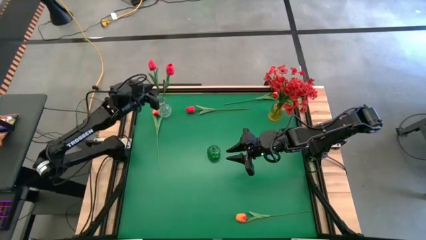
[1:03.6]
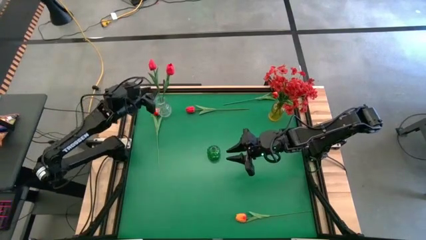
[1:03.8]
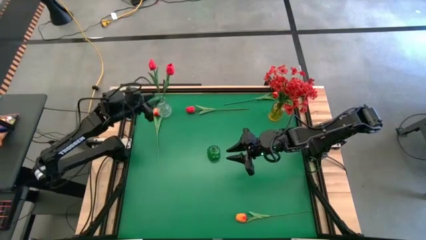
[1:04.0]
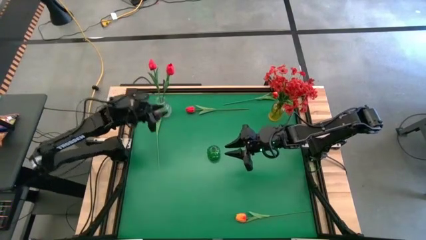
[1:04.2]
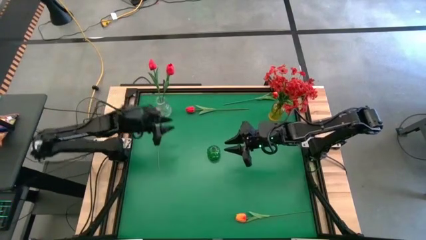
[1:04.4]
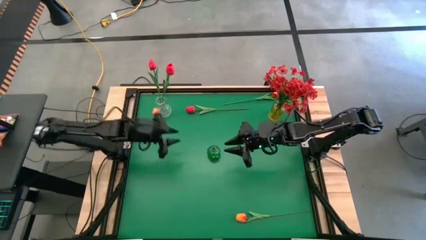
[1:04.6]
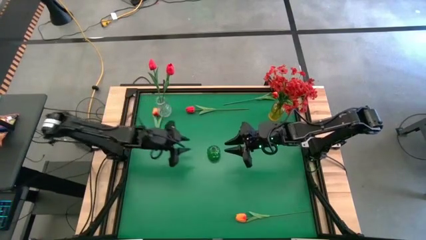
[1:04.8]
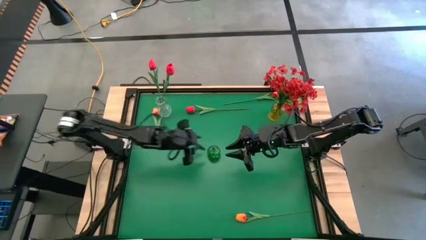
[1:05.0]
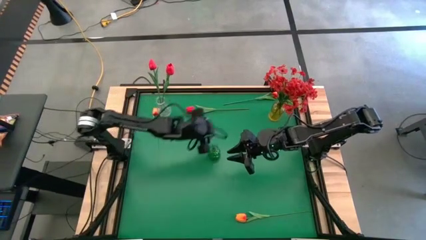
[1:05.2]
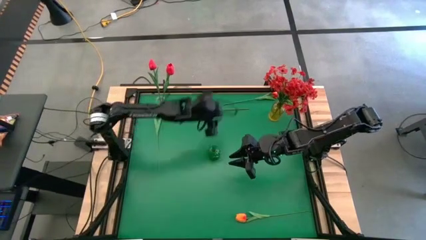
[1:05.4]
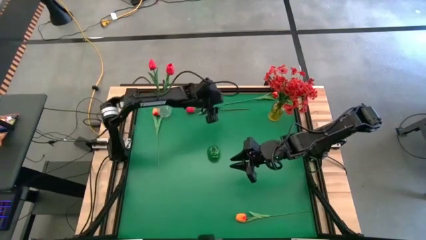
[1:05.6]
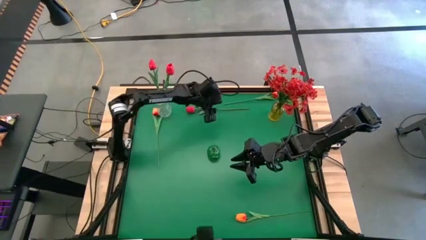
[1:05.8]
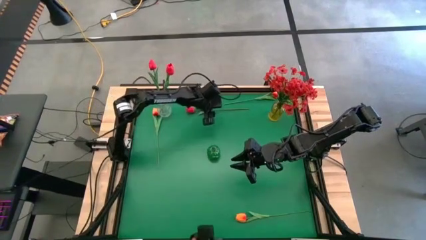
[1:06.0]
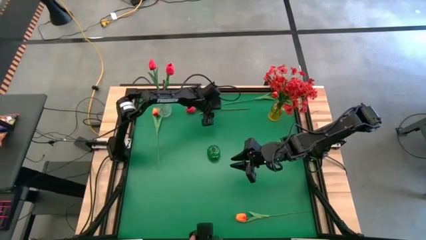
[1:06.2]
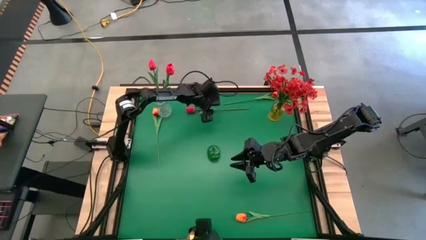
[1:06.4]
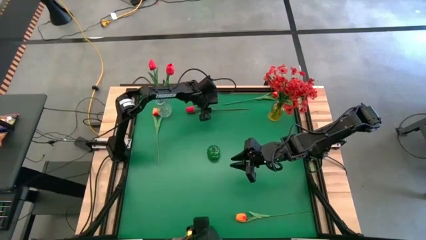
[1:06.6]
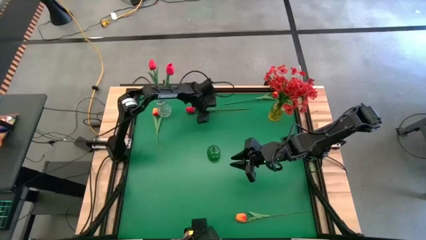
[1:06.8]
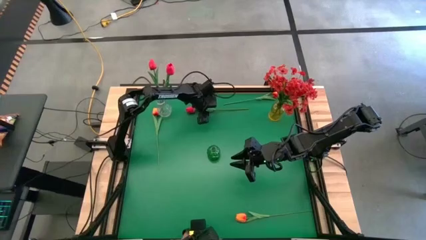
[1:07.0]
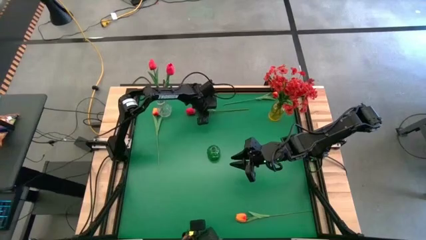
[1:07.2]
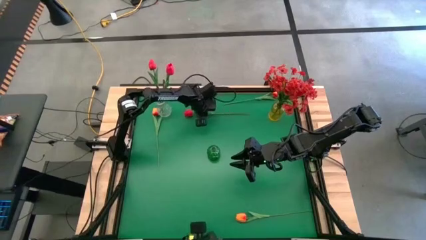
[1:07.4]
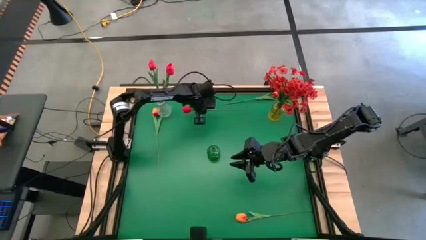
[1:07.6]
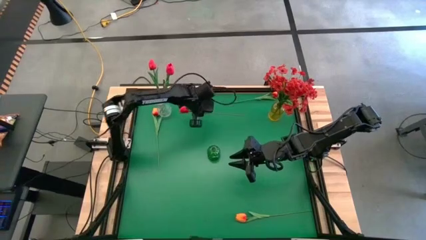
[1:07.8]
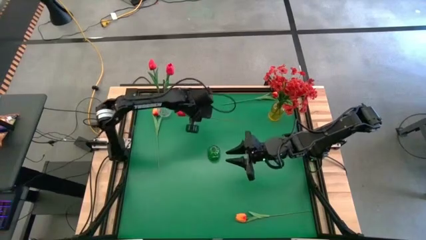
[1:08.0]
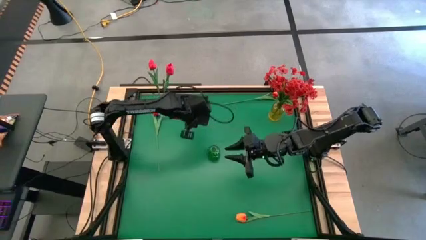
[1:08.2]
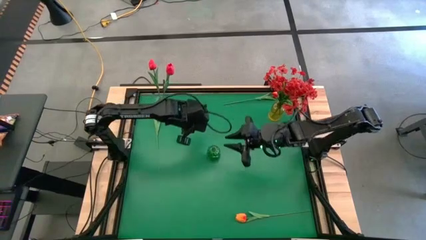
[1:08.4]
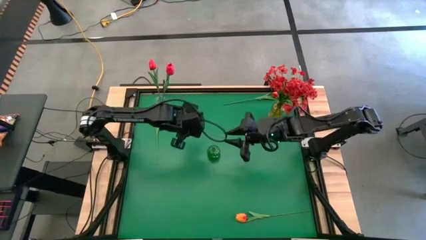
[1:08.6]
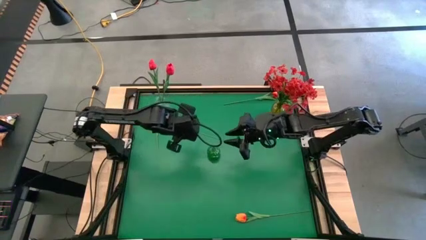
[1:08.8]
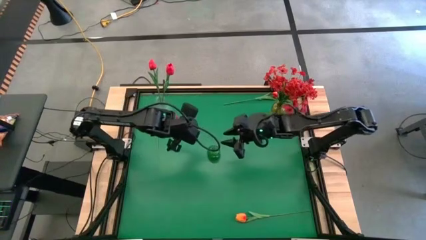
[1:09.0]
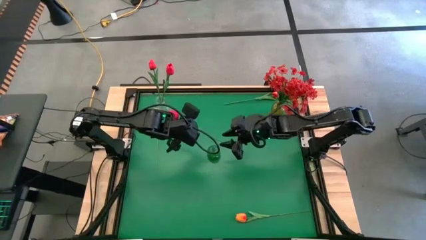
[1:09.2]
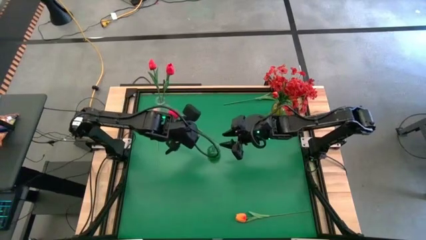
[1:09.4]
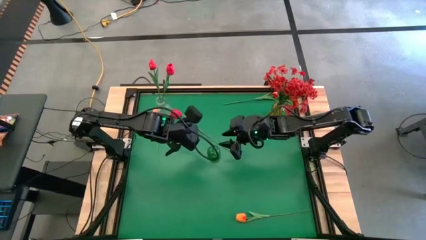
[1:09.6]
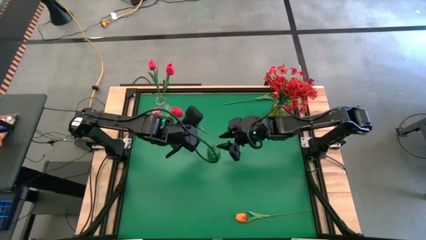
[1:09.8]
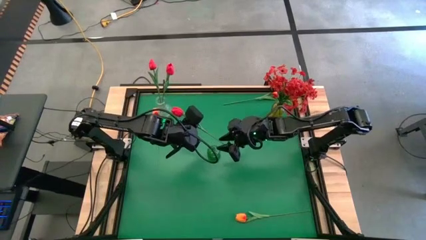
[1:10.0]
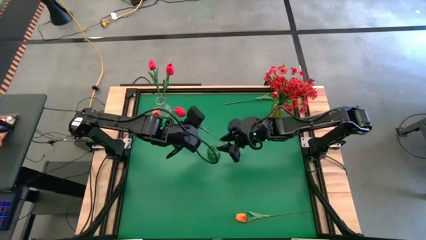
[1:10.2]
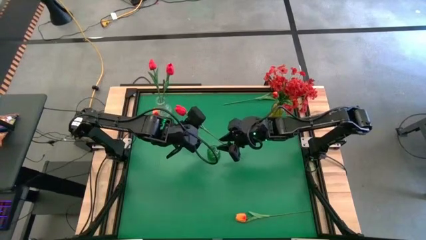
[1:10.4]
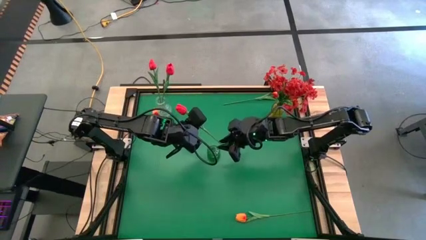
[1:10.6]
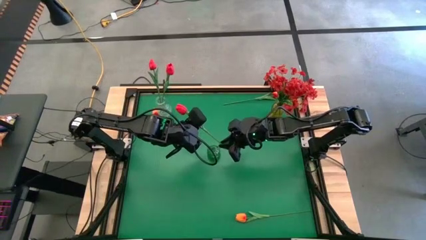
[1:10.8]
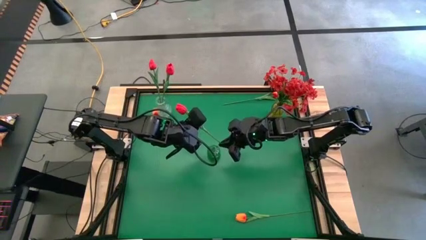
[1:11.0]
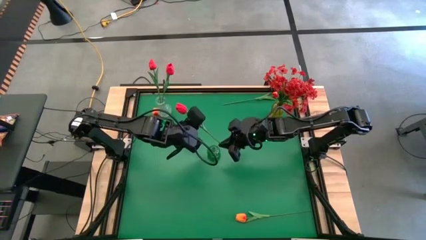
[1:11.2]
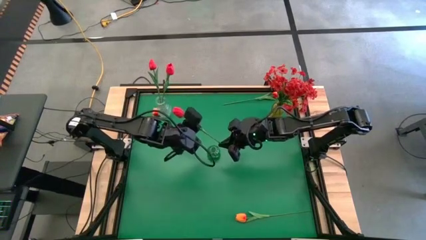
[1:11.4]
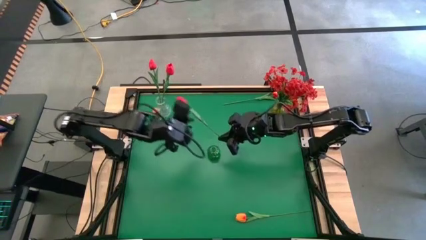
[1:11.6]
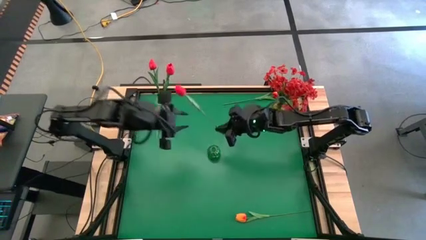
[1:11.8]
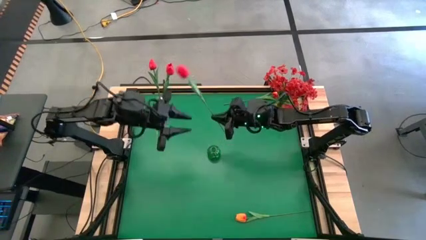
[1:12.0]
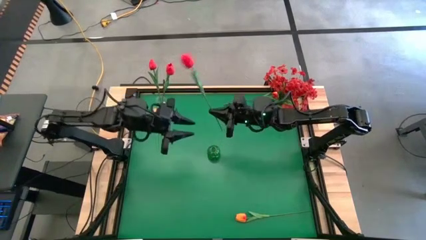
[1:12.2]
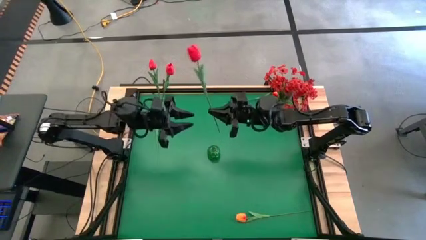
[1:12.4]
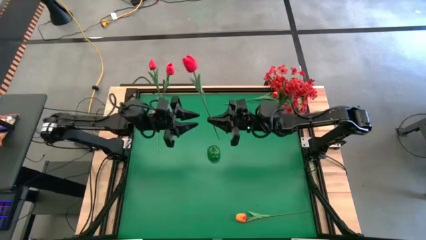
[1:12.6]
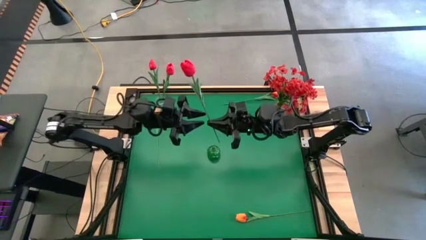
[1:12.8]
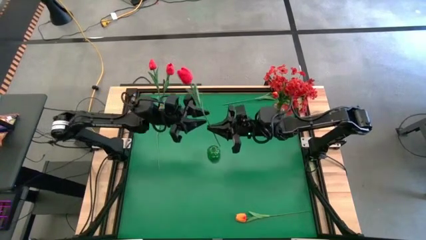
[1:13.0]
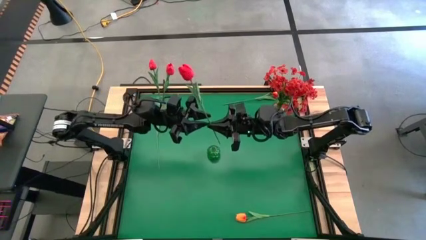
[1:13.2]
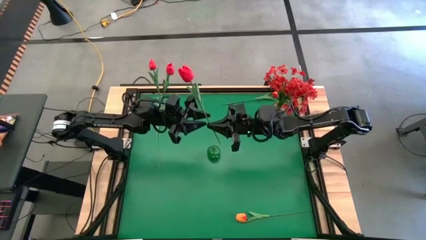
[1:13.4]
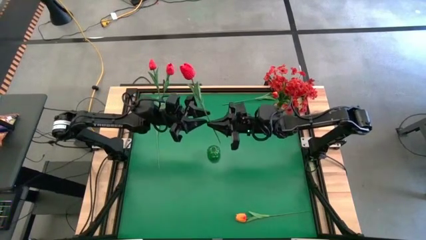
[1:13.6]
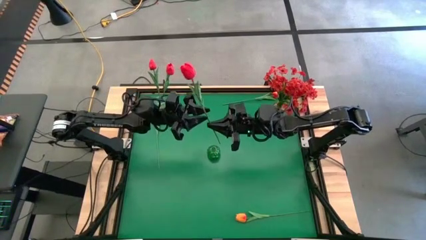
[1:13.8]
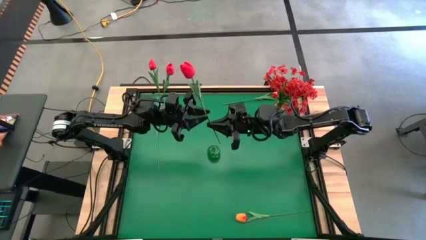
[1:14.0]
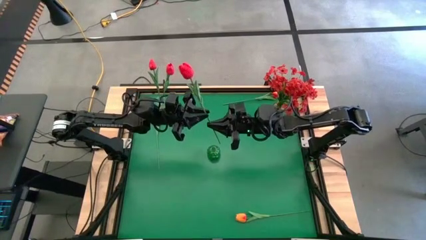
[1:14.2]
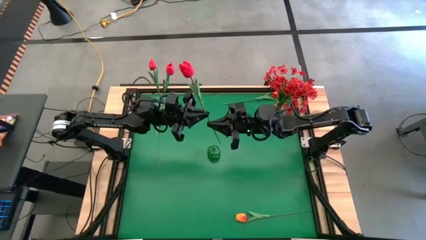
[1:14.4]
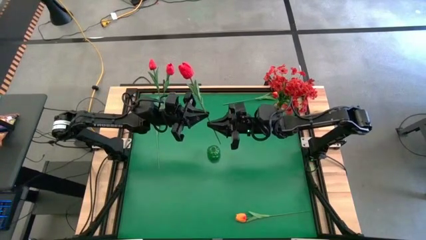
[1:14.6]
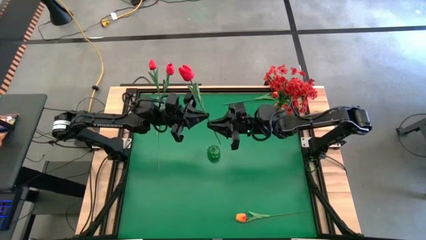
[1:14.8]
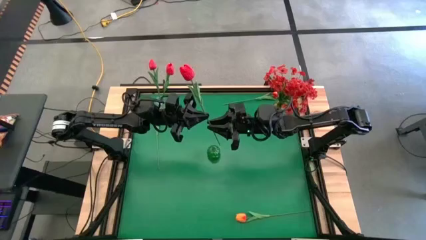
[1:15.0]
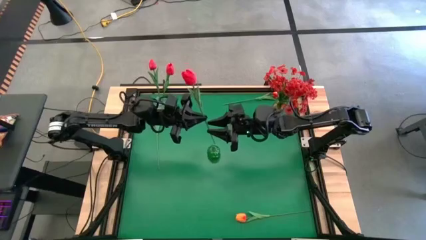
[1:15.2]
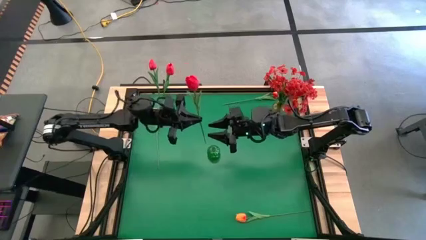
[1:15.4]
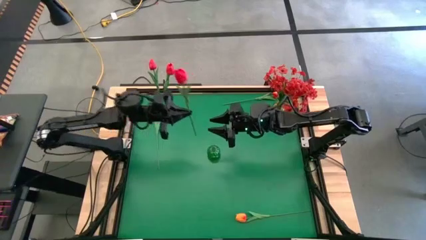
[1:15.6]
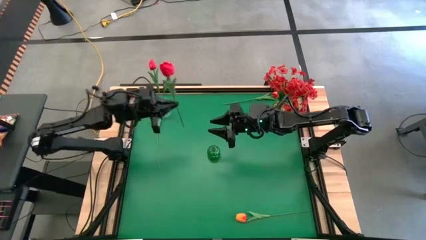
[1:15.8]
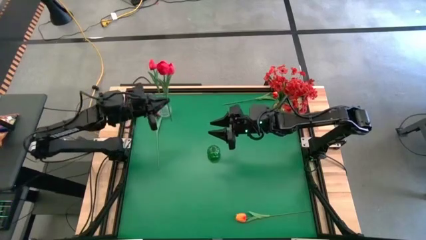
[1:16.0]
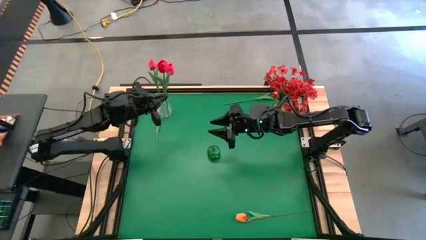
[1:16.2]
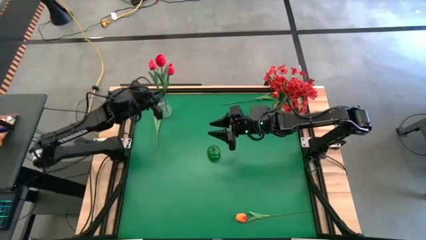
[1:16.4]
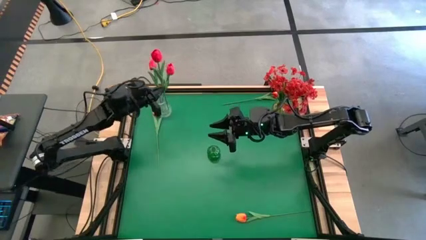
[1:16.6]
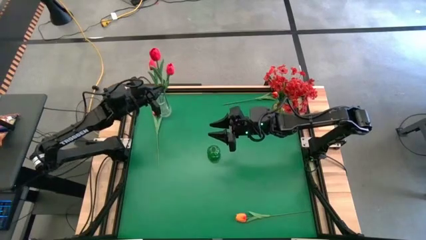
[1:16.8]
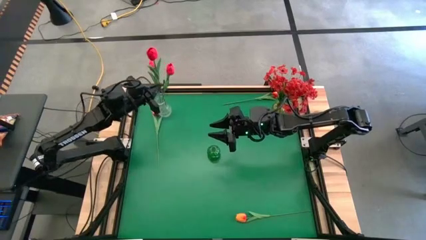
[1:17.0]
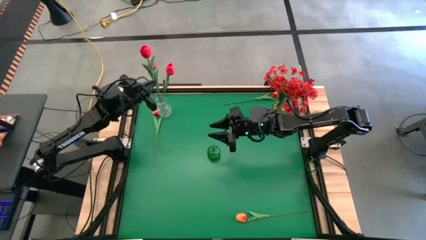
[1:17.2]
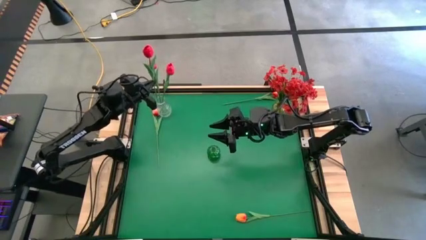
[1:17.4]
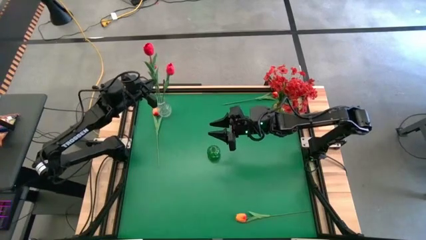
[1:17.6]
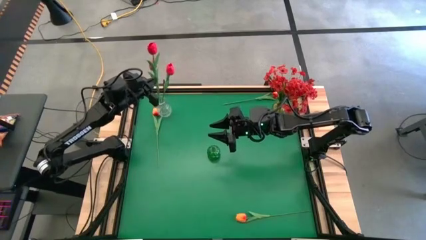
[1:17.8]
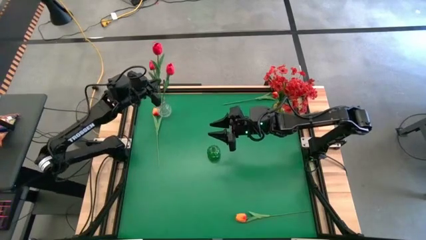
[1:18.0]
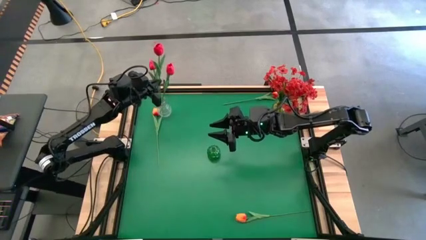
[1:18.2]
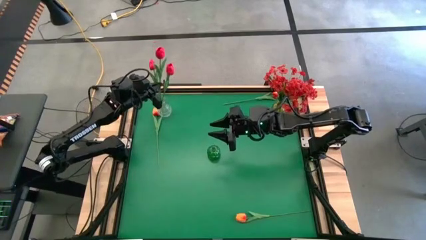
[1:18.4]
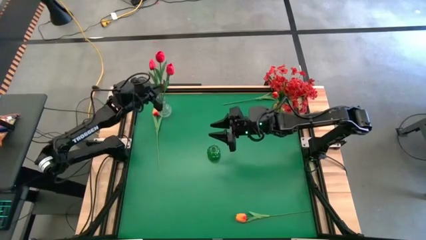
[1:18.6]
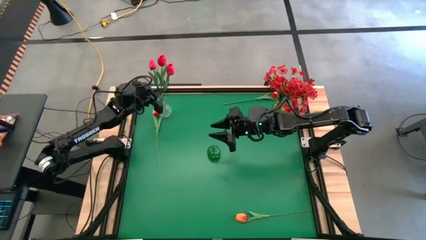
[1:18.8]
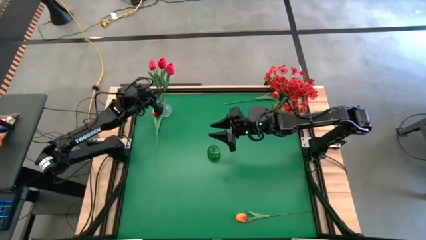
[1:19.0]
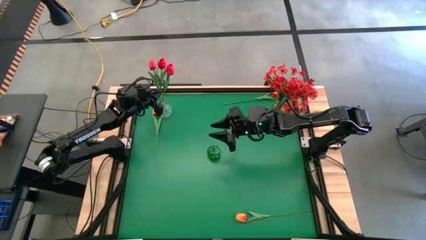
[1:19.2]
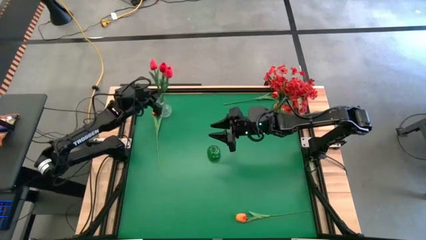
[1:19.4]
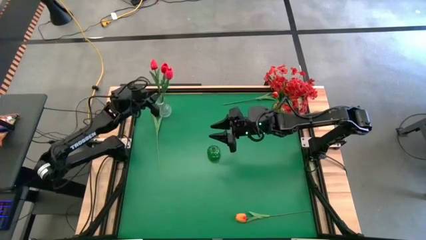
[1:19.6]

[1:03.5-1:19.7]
Task: Sort flowers into vase by color
Put the red tulip into the transparent vase

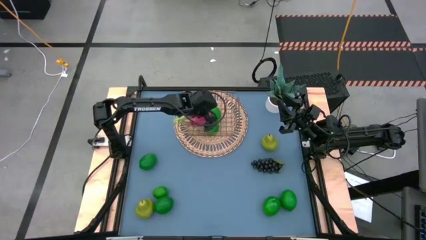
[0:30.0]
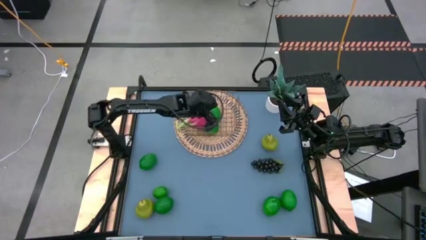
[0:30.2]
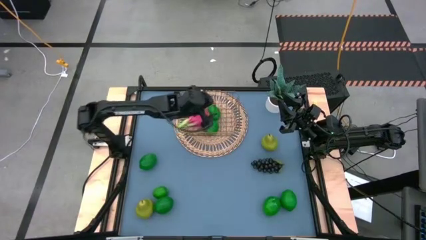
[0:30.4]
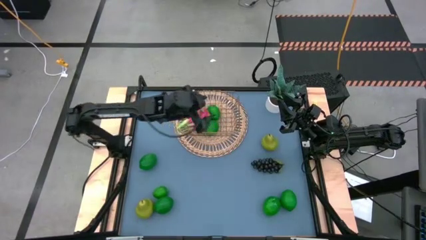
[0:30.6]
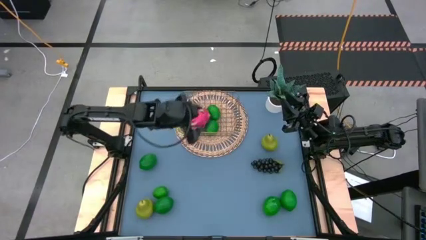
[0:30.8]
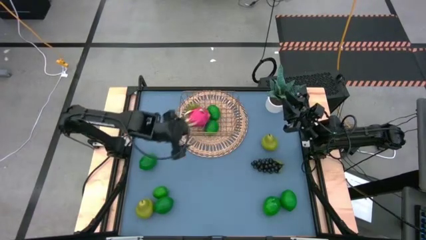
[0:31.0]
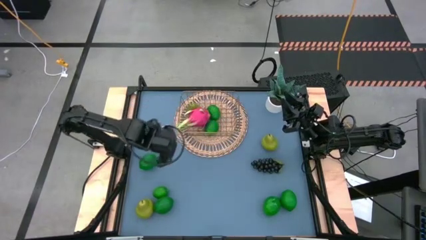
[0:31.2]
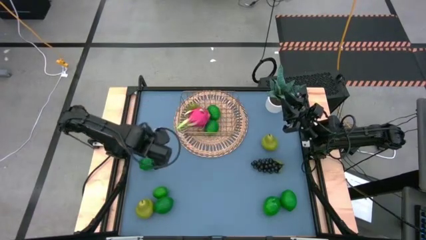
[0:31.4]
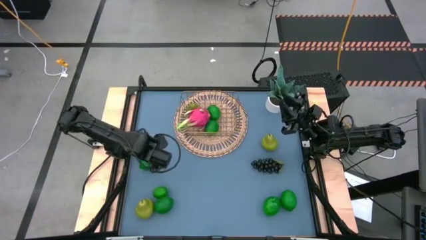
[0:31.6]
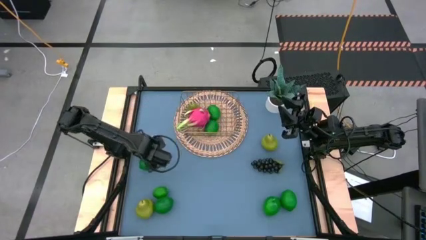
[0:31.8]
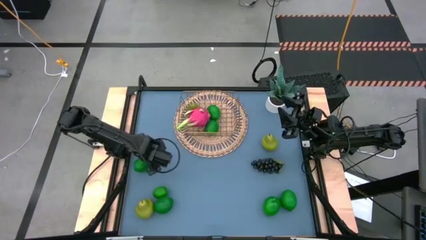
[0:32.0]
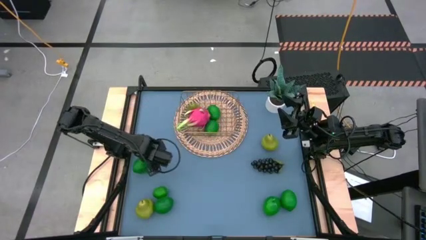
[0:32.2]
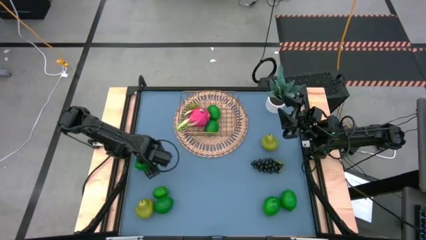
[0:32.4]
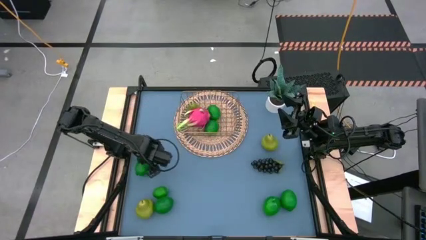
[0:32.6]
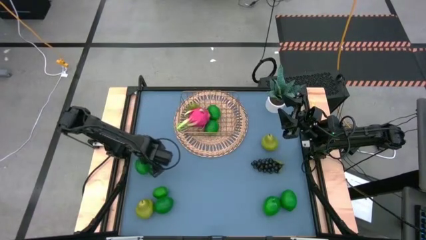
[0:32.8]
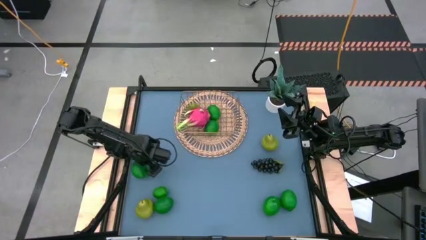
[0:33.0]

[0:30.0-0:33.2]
Task: Build produce basket
Put the green lime into the gold wire basket
